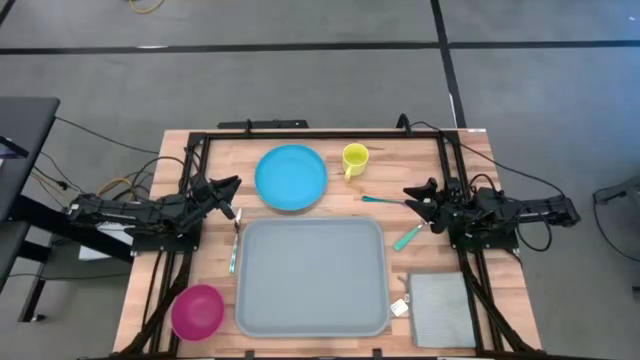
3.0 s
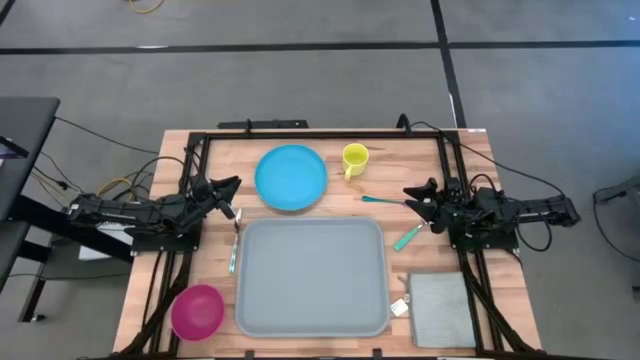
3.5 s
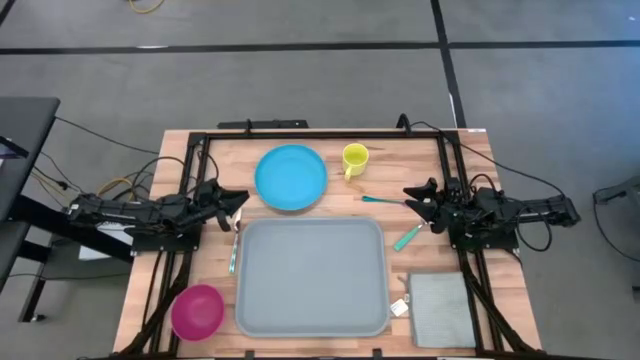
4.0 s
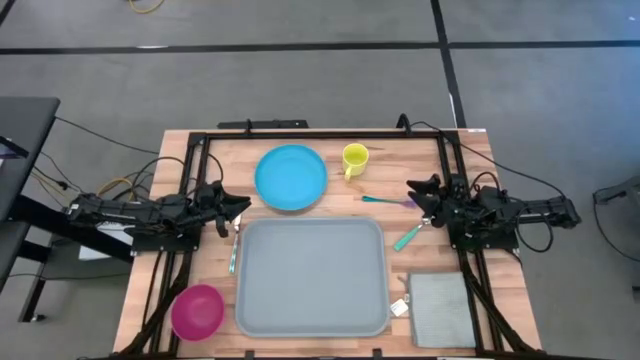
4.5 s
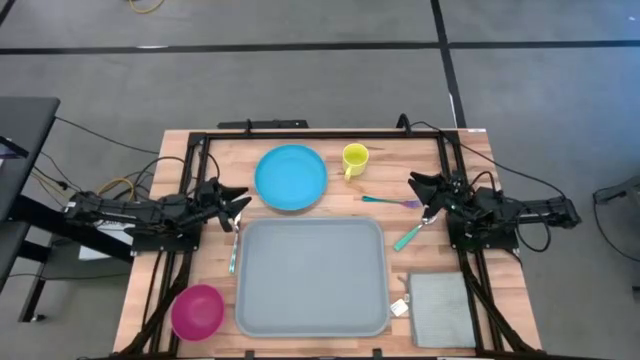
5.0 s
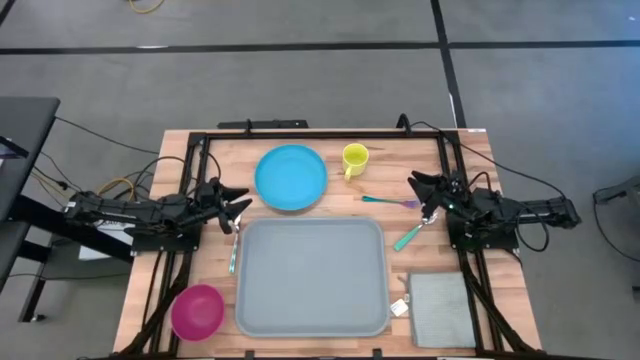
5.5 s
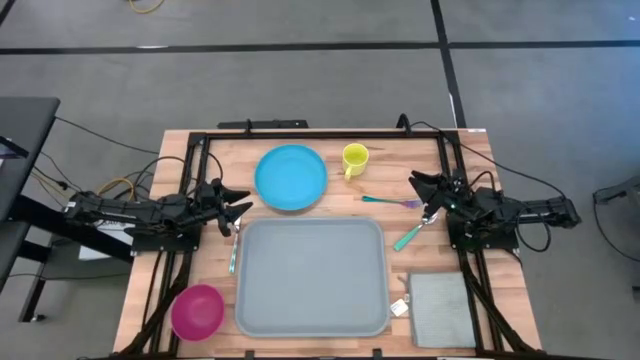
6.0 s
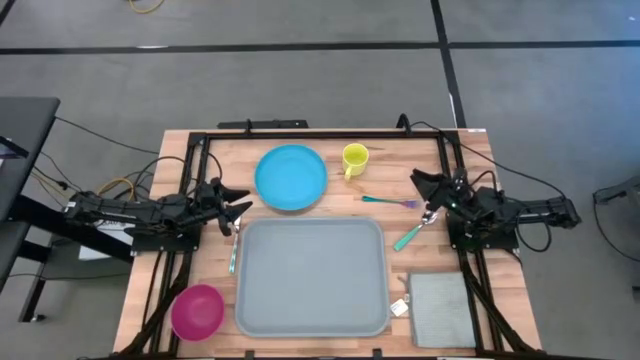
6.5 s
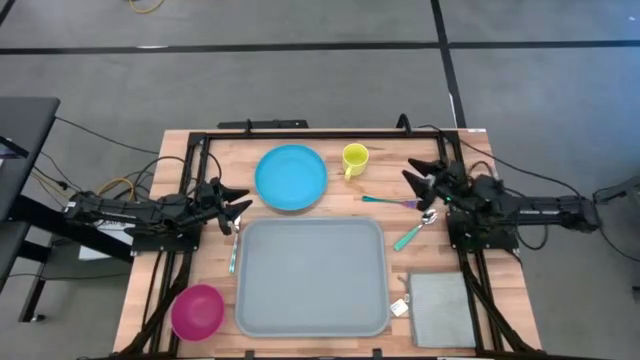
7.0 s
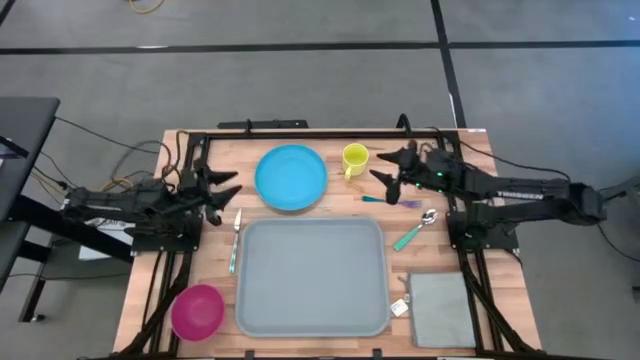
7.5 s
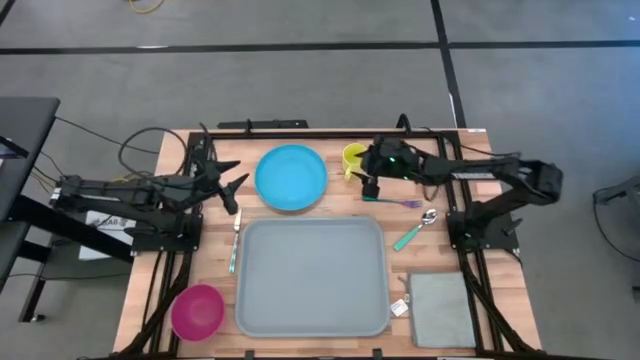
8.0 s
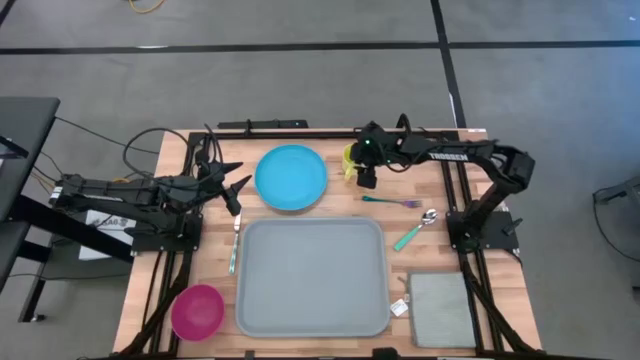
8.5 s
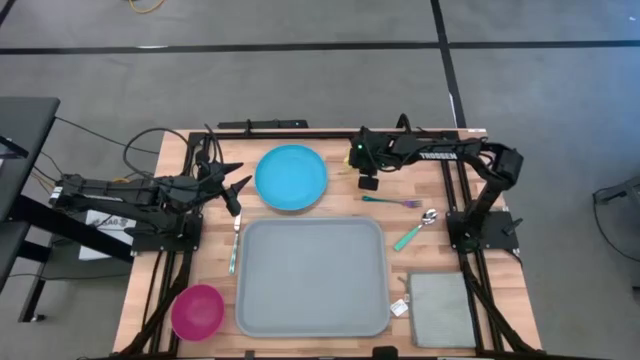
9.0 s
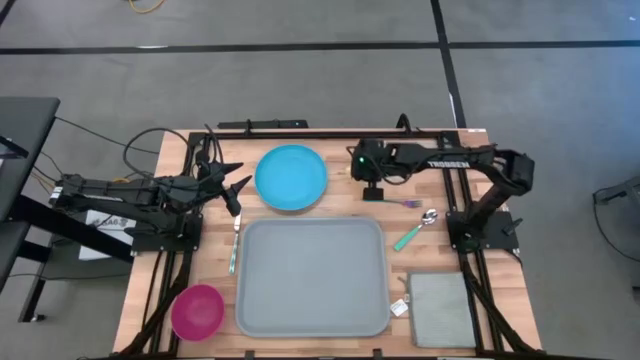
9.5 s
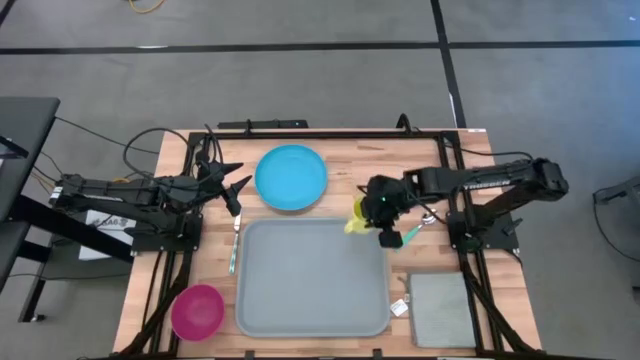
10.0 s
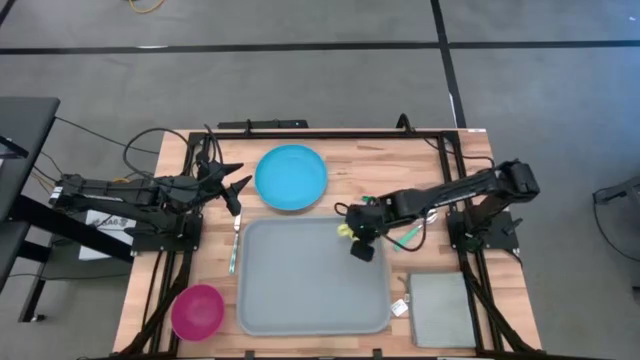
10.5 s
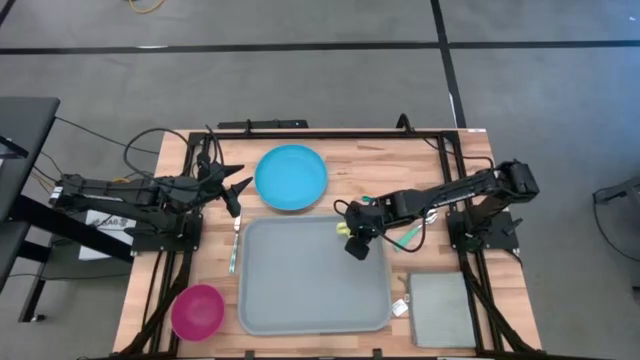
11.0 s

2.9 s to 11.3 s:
Task: Set up tray
Put the yellow mug on the gray tray

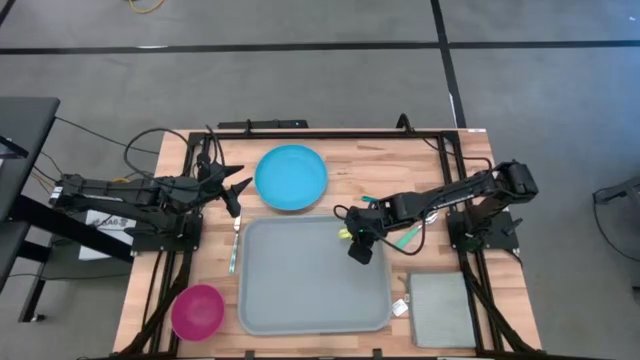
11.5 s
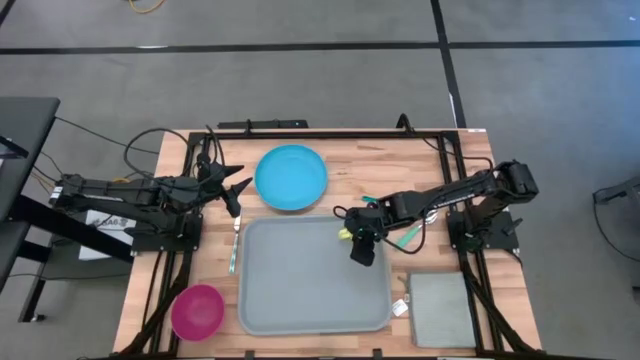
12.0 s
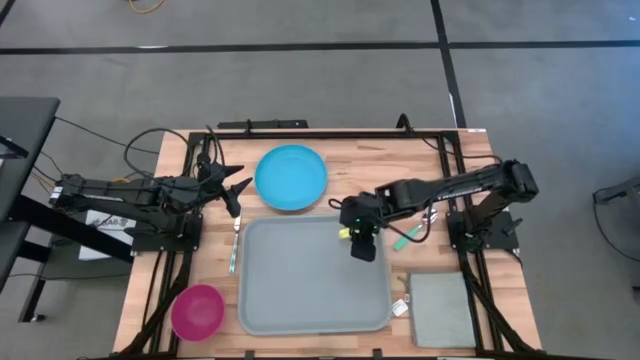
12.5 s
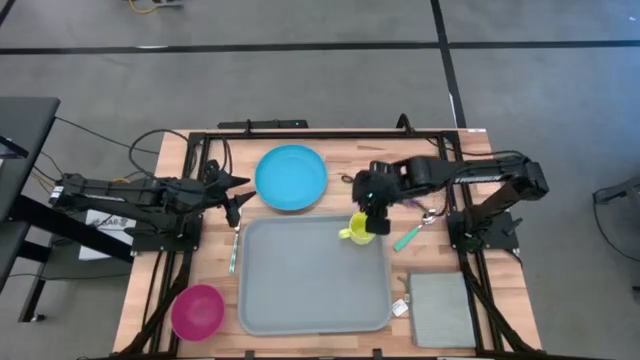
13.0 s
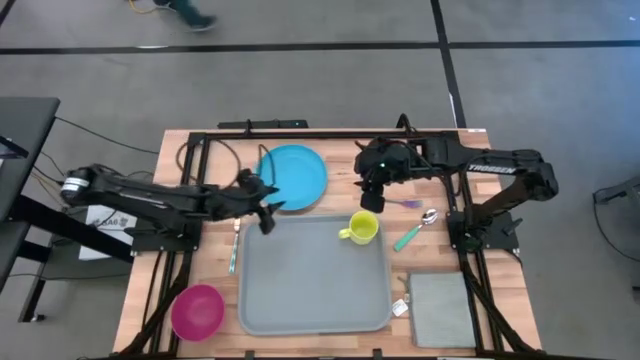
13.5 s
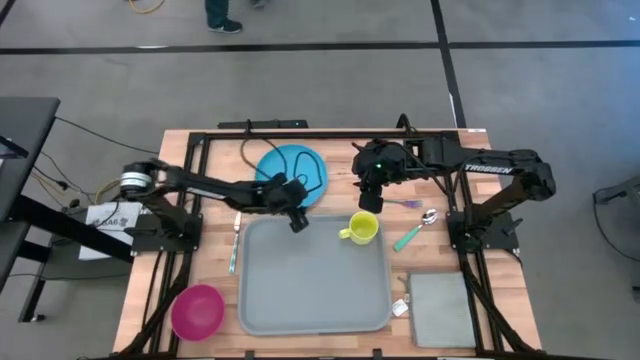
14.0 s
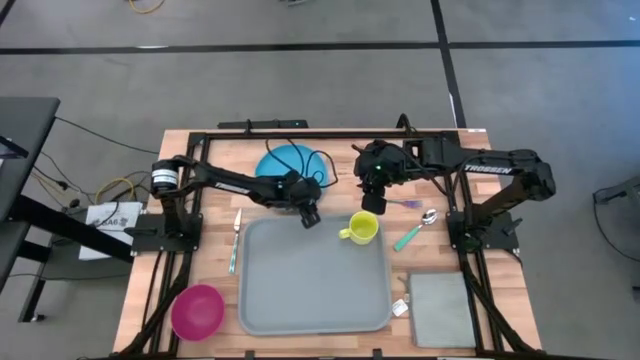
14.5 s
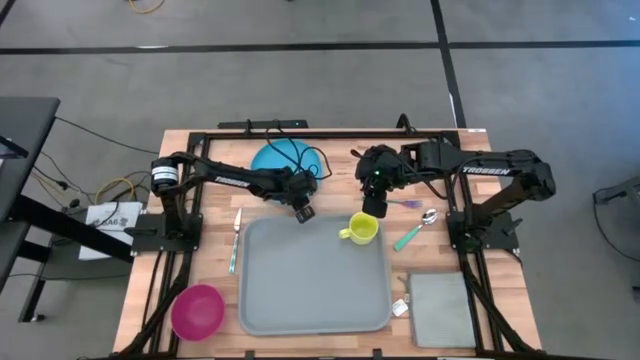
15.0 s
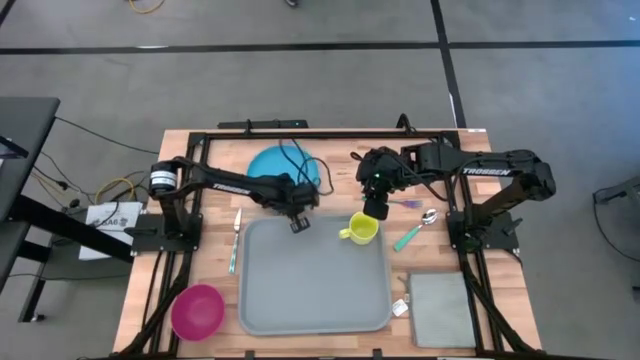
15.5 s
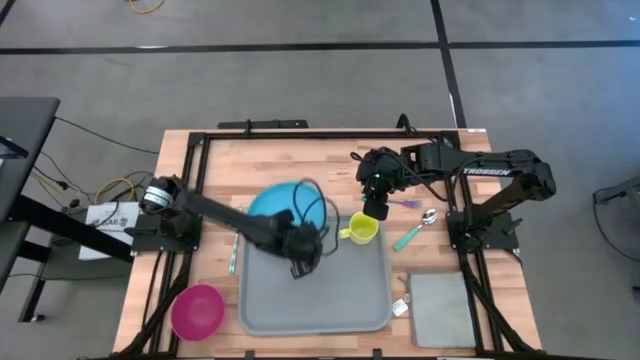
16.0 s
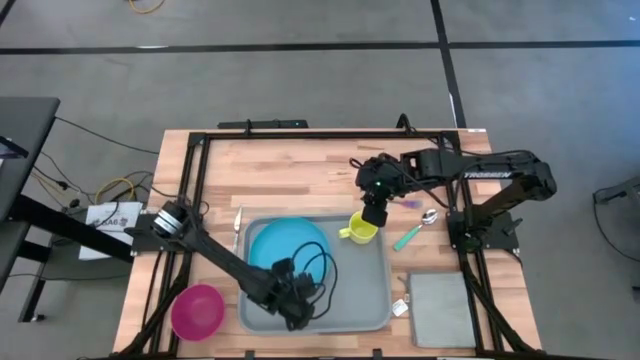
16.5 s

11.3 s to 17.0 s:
Put the blue plate on the gray tray to the bottom right of the yellow mug

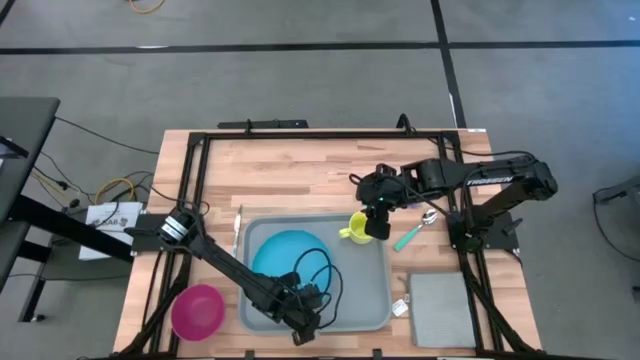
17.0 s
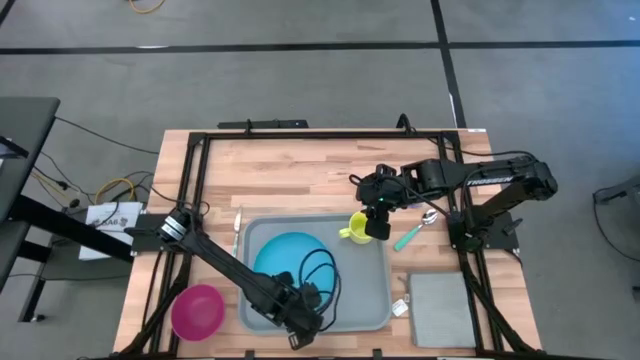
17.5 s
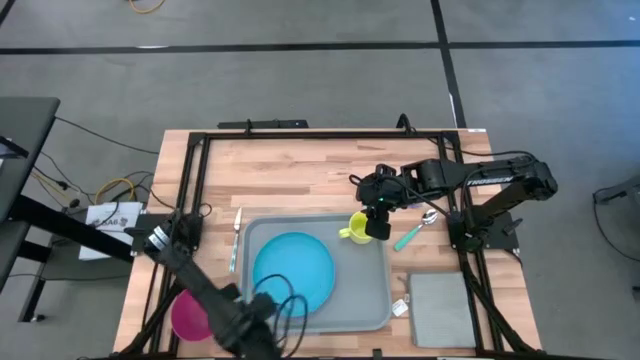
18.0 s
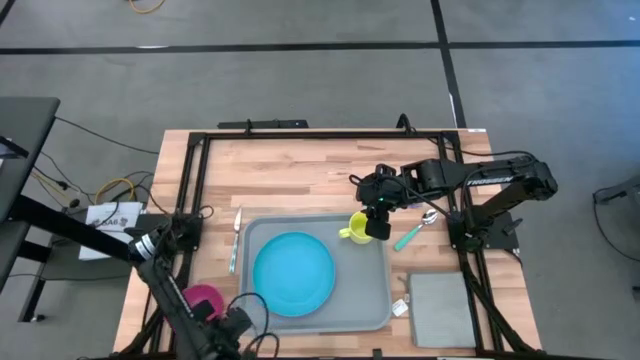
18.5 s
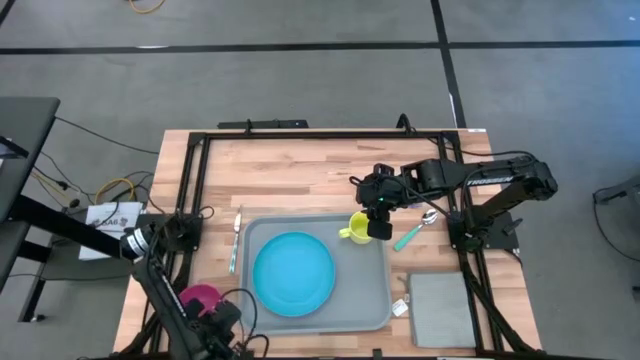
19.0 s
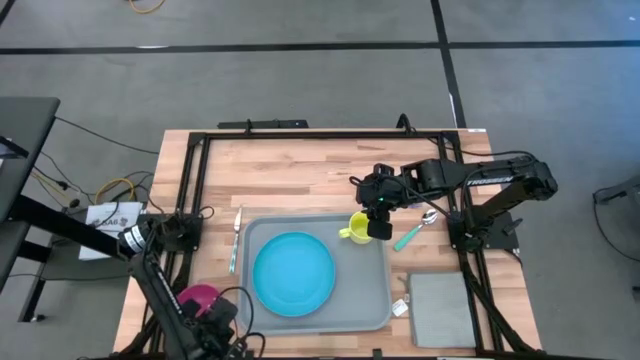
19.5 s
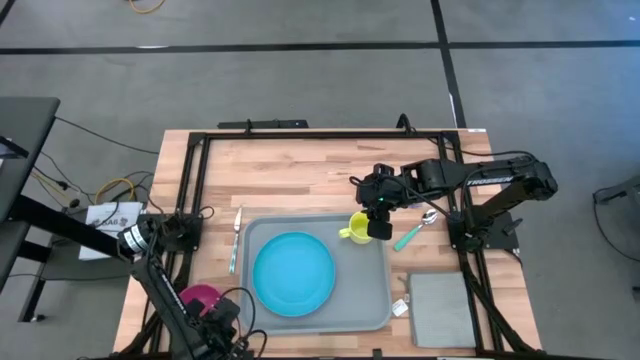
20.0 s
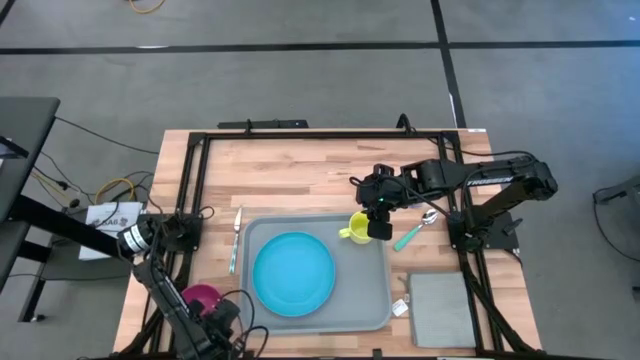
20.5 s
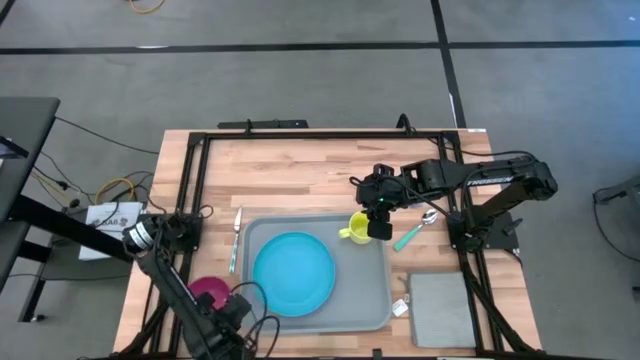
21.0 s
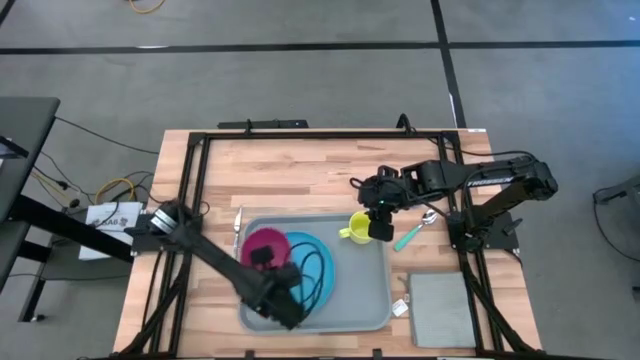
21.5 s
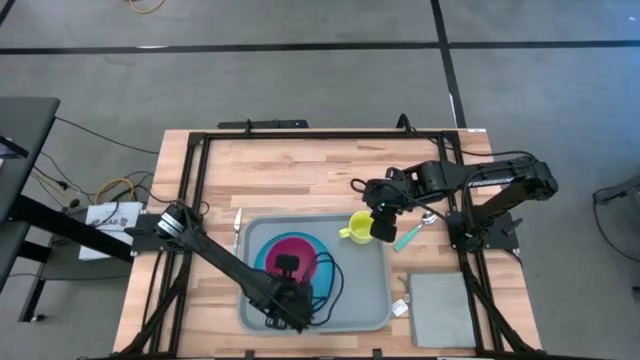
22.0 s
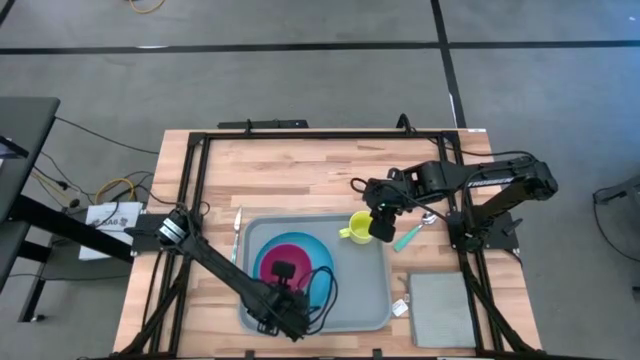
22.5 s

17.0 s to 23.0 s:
Put the pink bowl on top of the blue plate on the gray tray

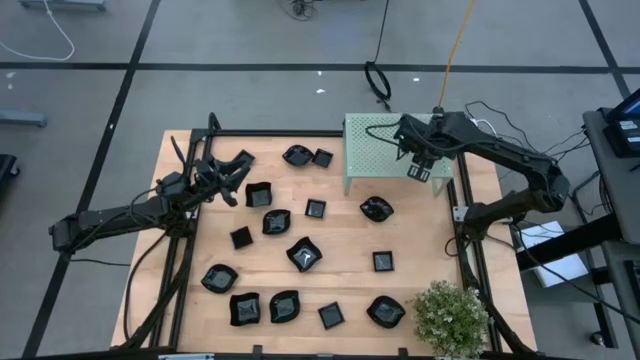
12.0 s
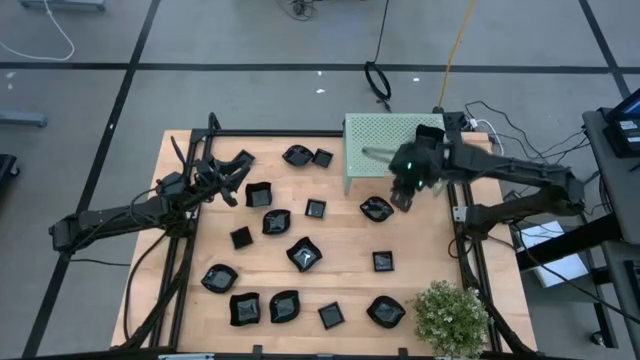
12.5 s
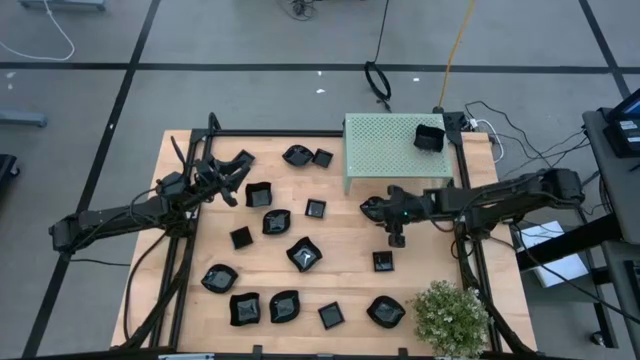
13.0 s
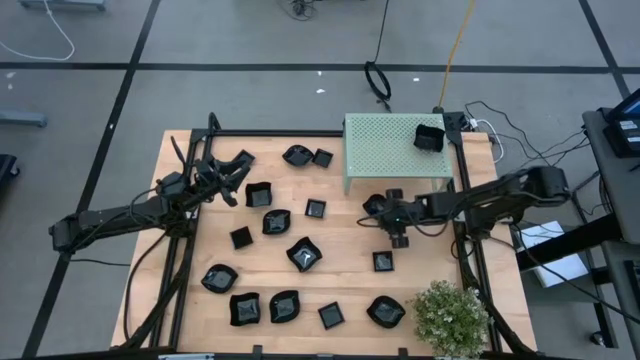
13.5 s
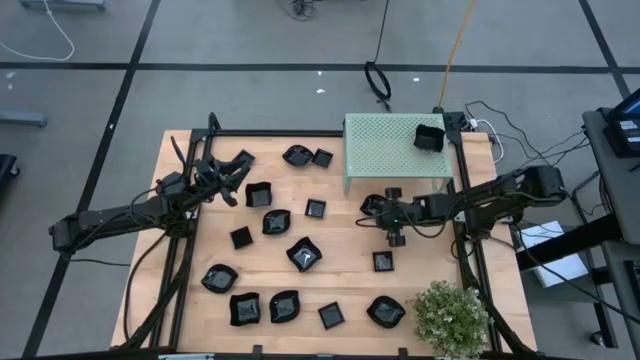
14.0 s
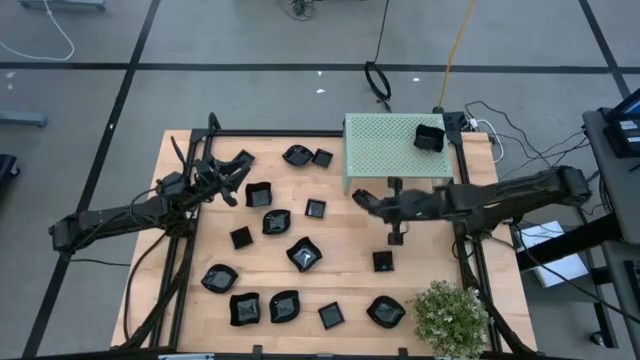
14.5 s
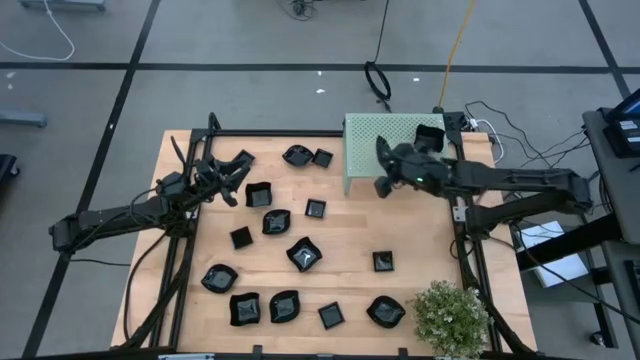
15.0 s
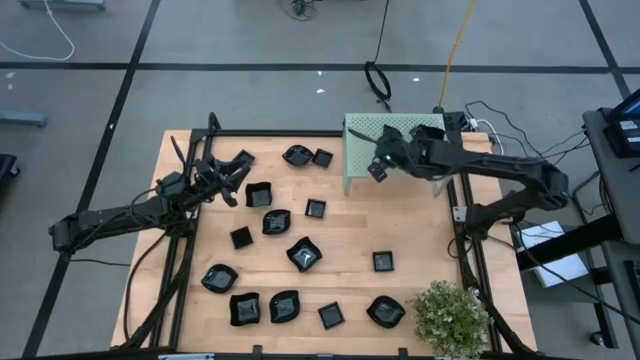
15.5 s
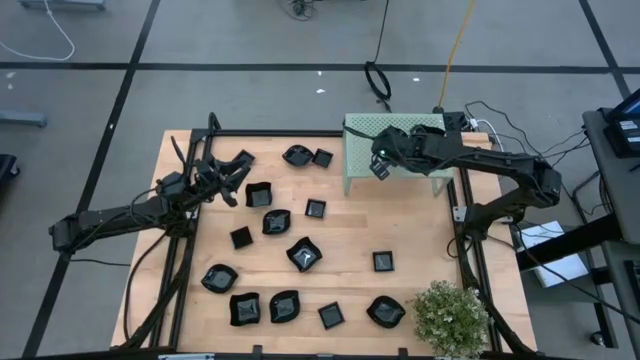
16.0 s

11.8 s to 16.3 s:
Task: Pick & Place Mini shaped plates
Put the leaf-shaped plate on the shelf
